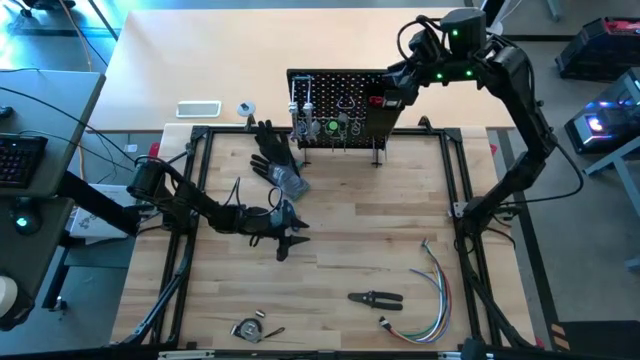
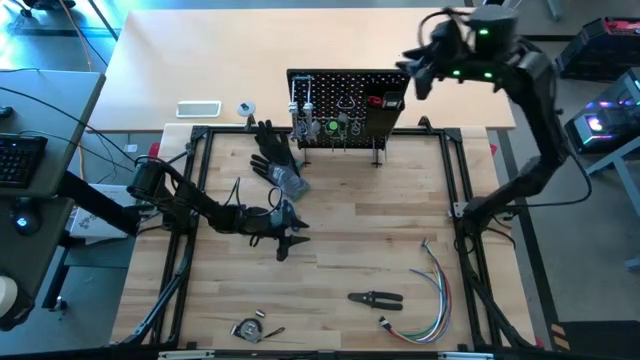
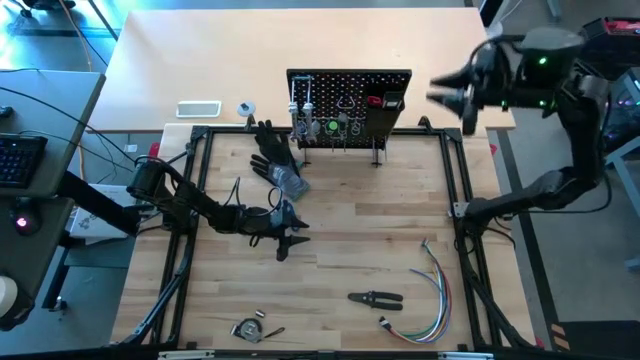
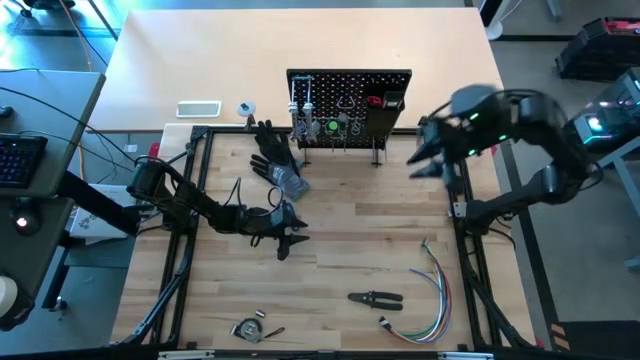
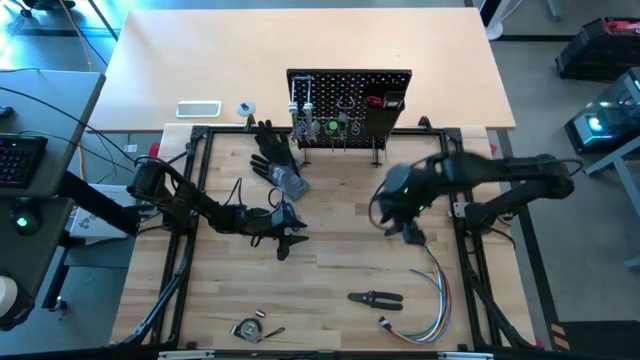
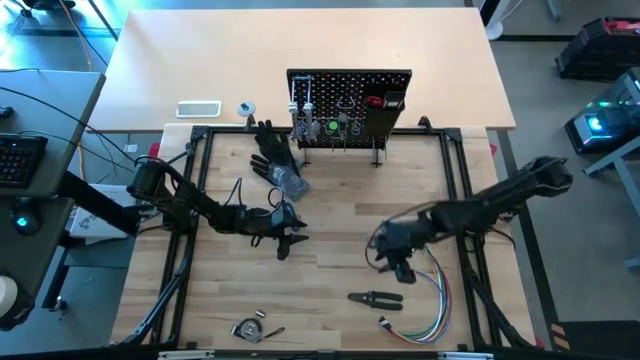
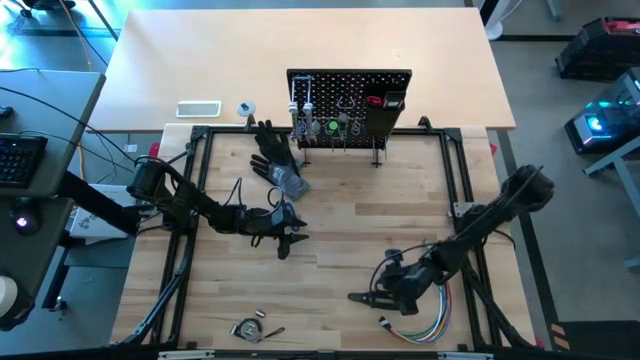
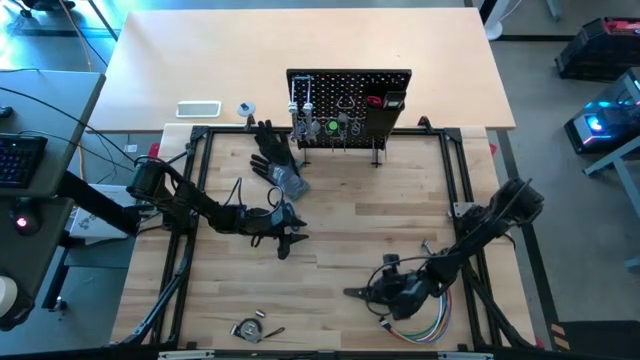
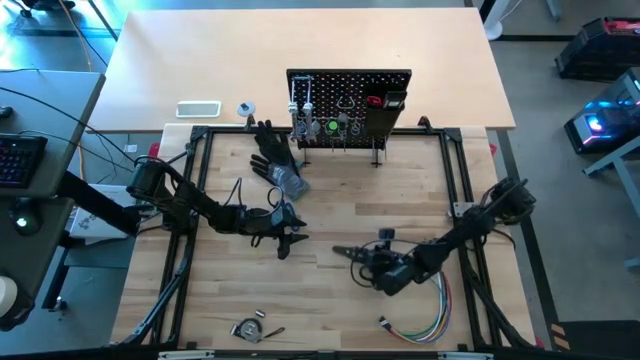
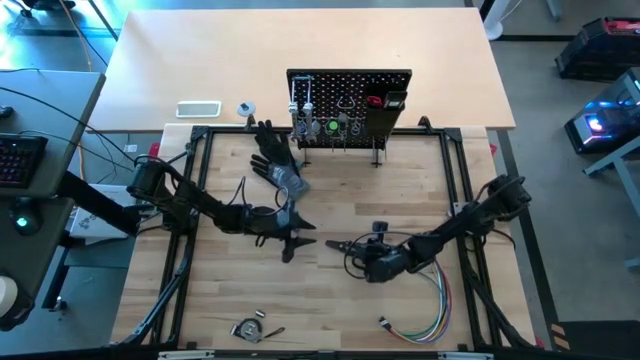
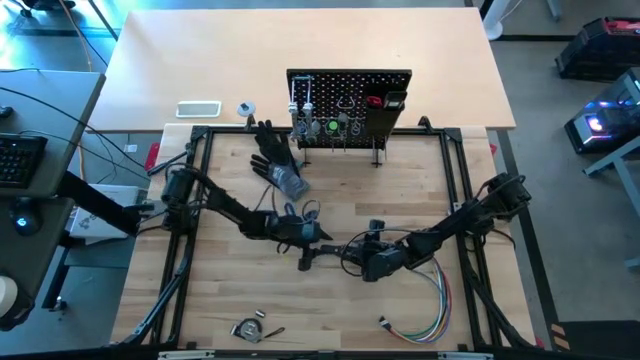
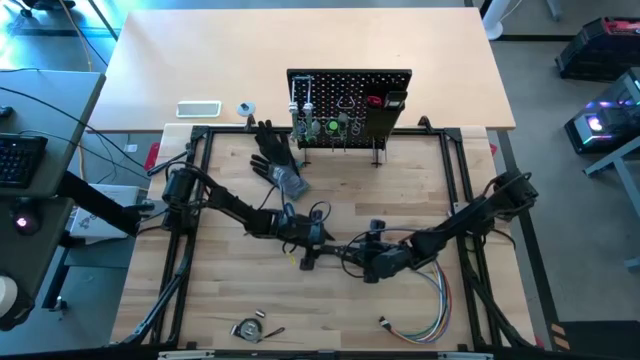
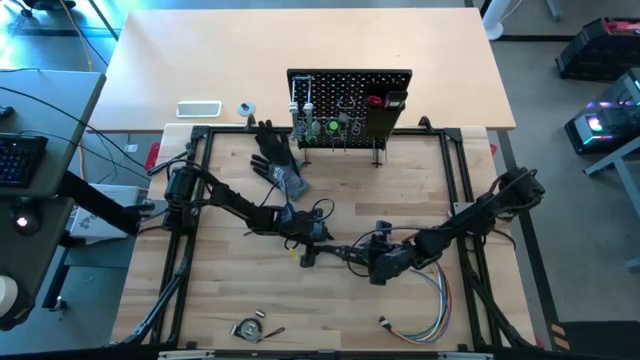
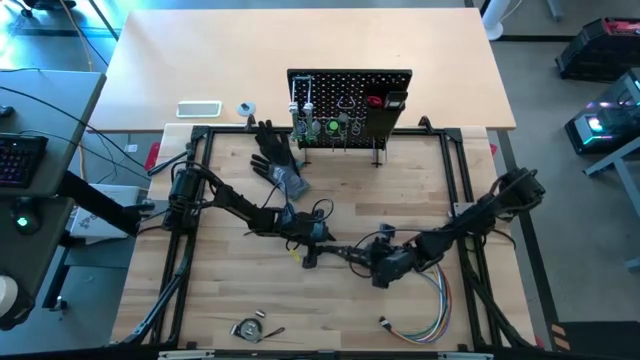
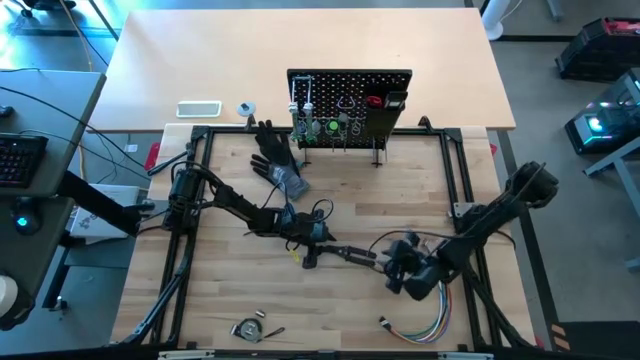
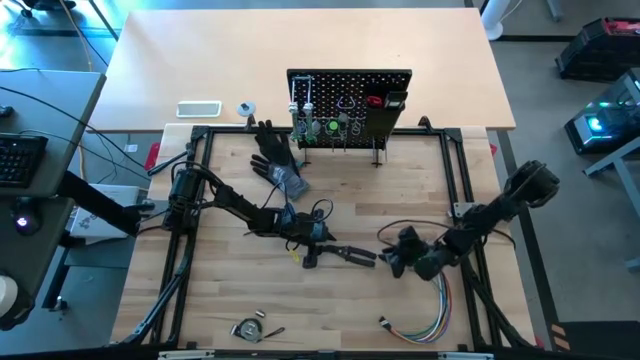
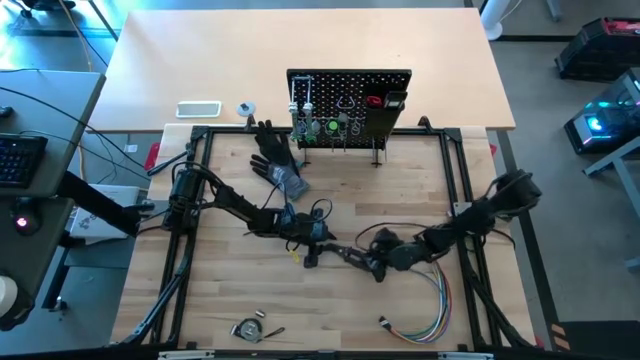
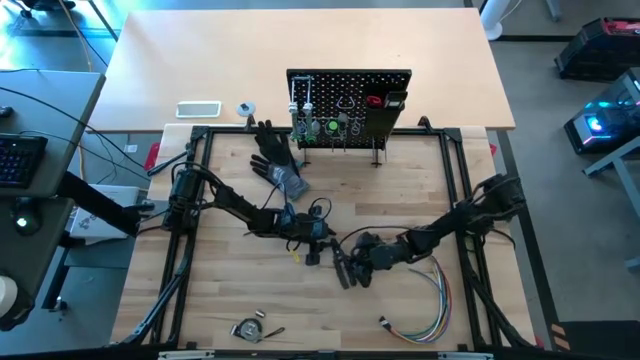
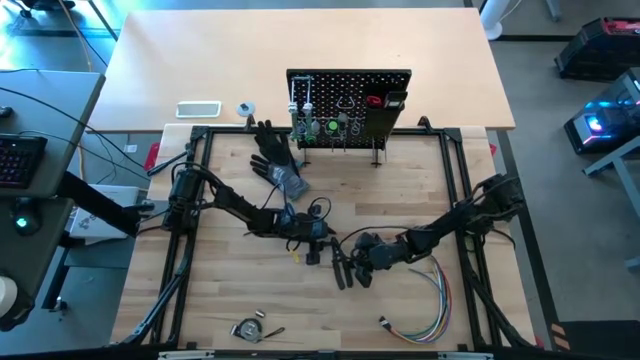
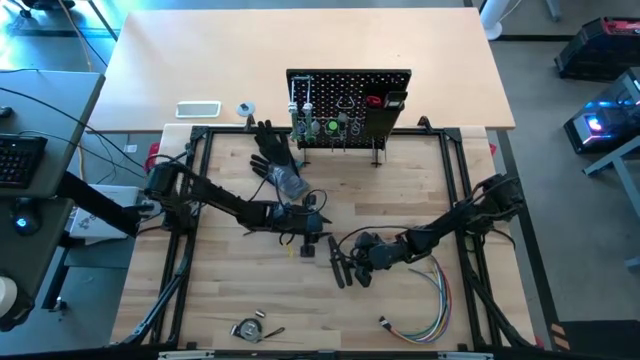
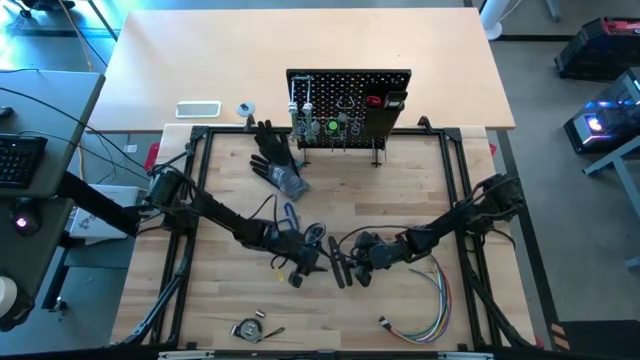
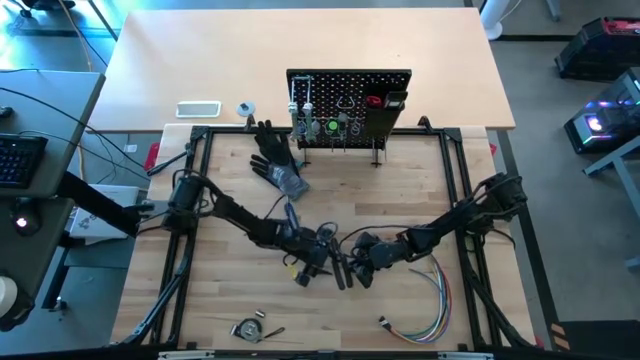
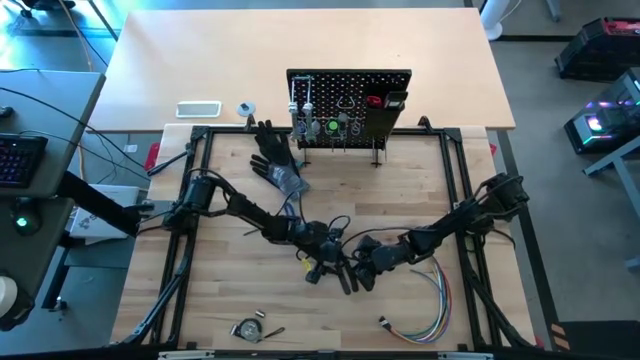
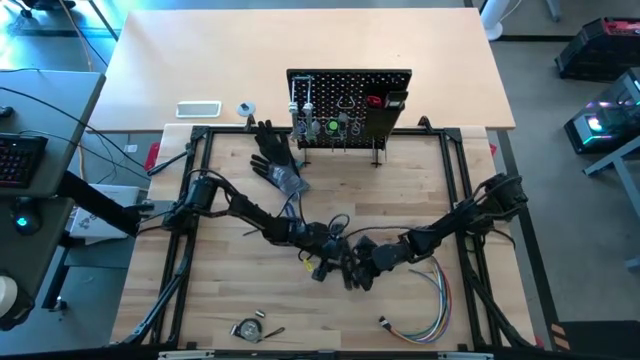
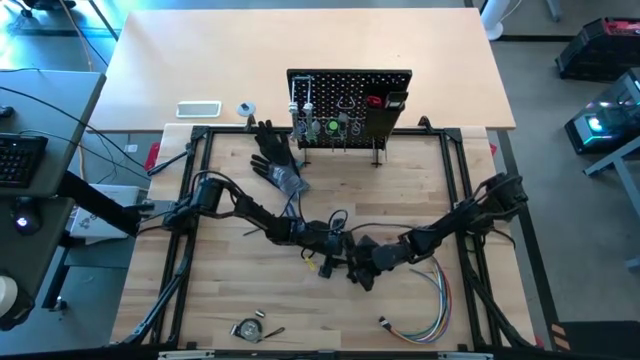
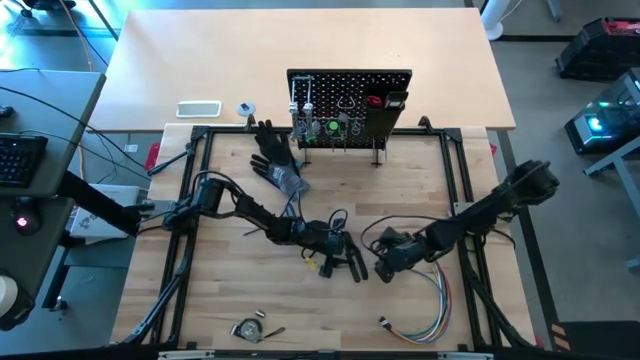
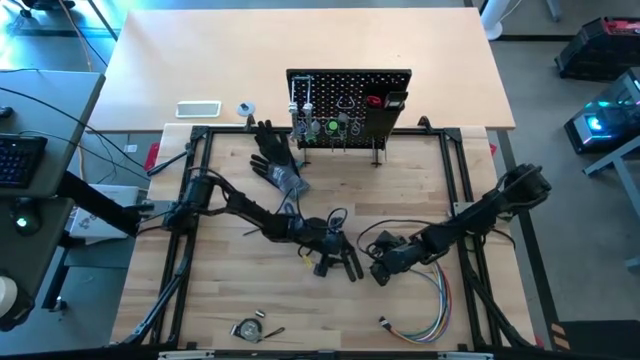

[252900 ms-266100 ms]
Task: Hang tools onto peg board
Hang the black pliers on the pegboard

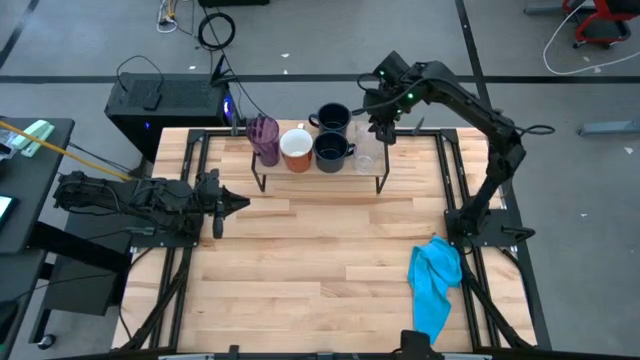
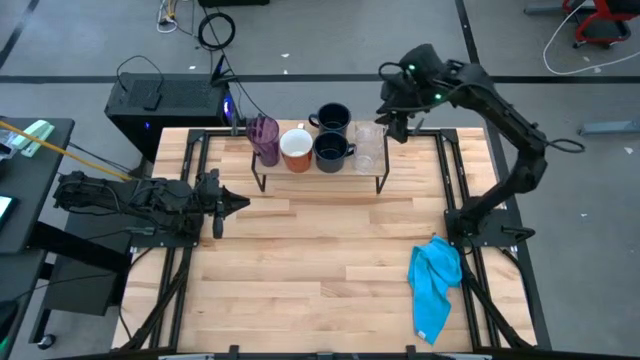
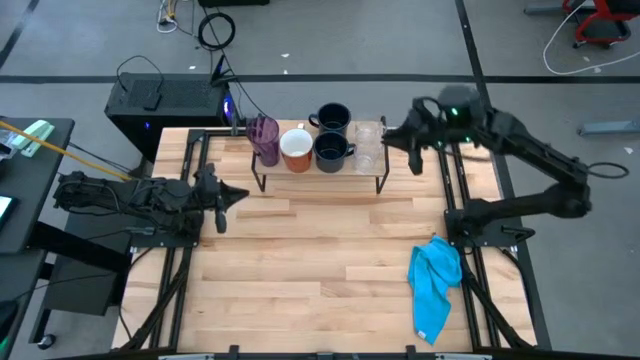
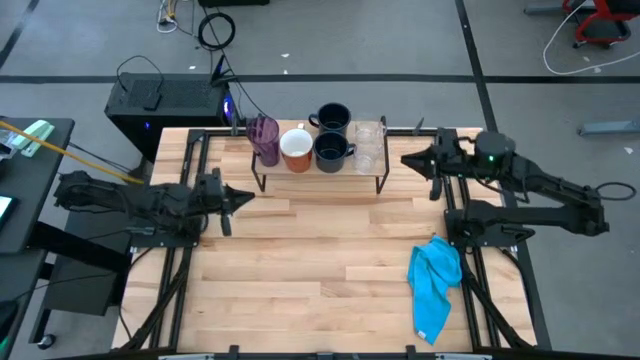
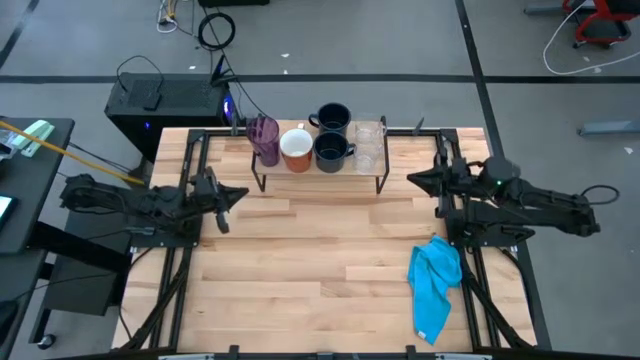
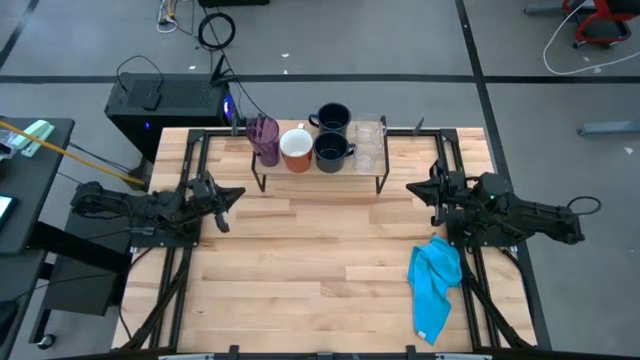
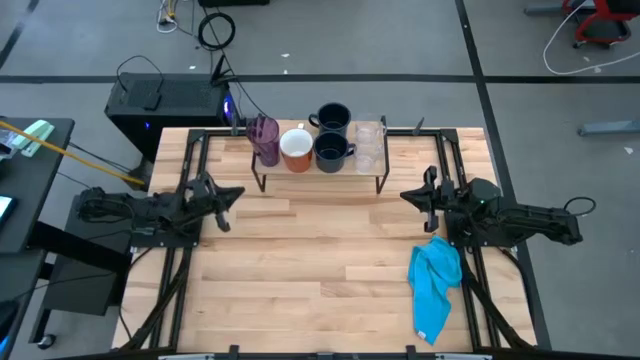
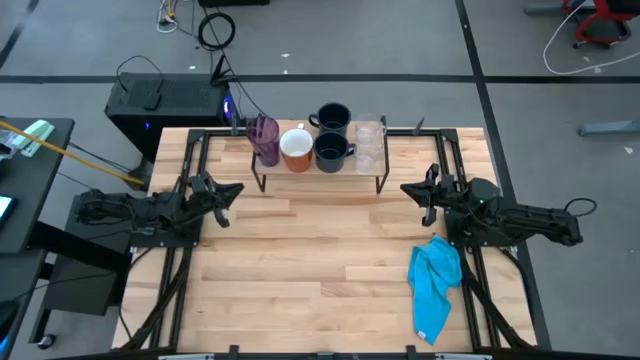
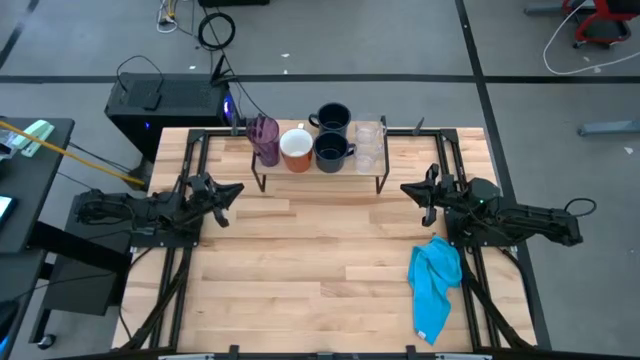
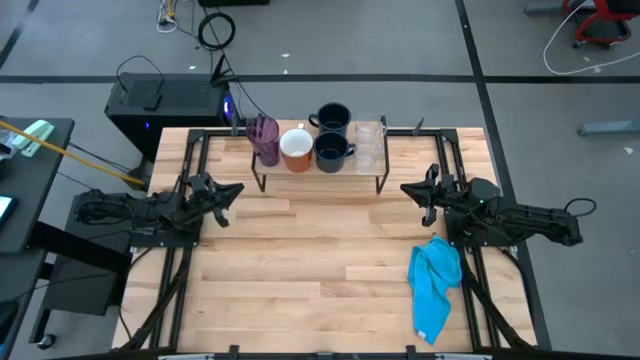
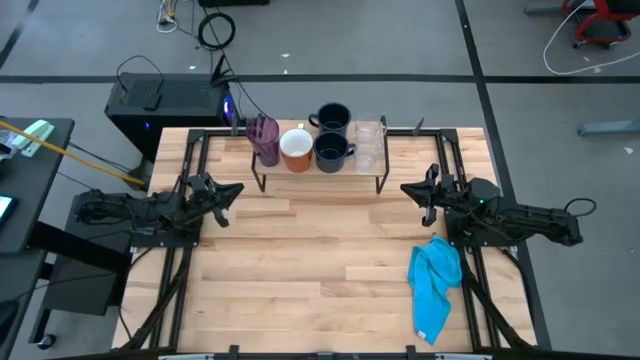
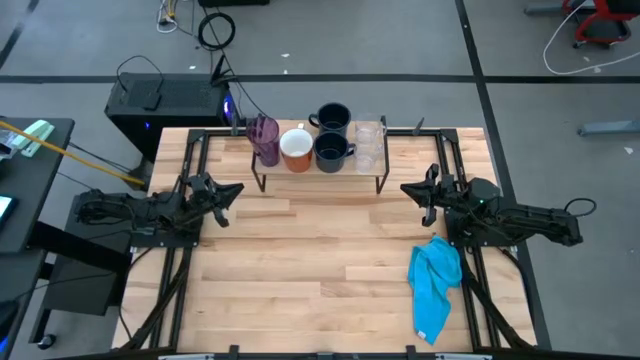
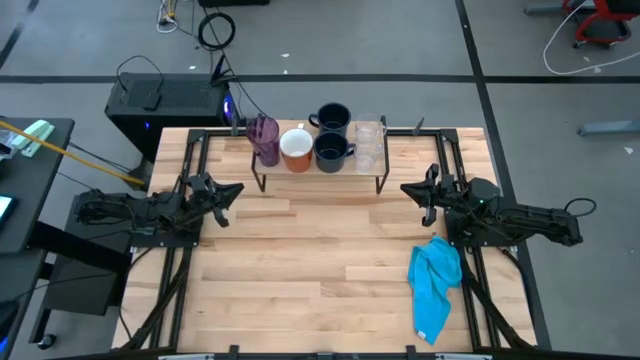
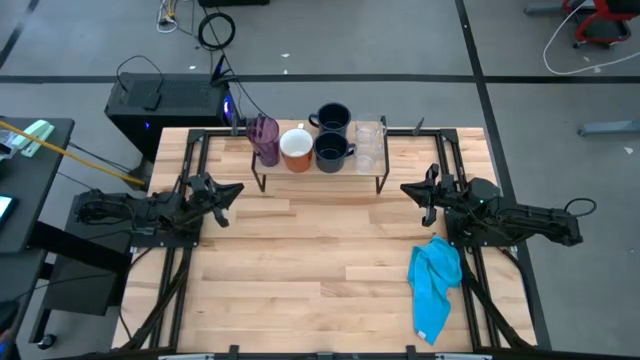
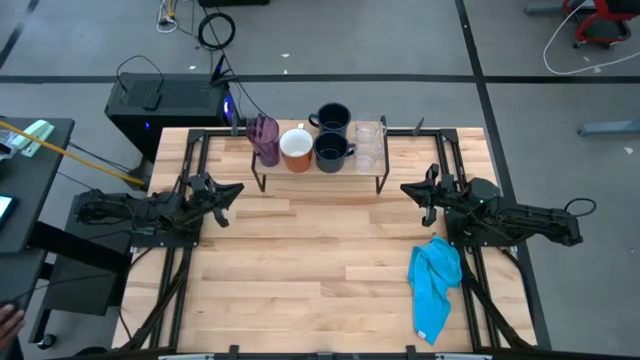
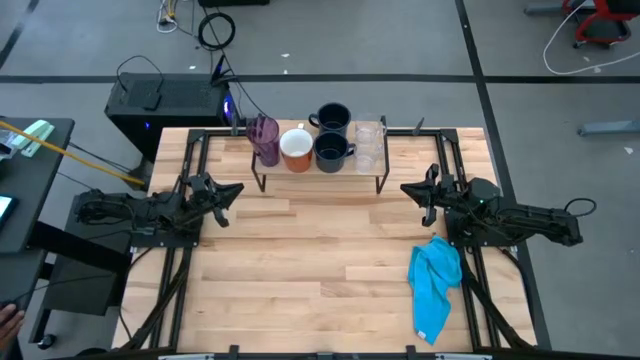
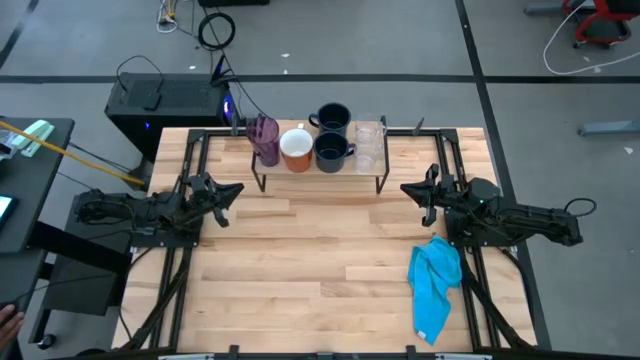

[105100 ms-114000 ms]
Task: Stack small to large cups/mugs on shelf
Return to Home Position
